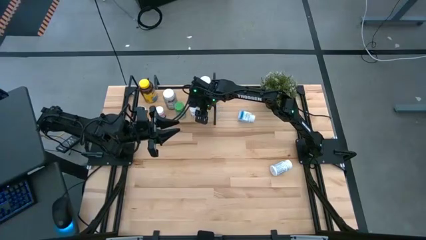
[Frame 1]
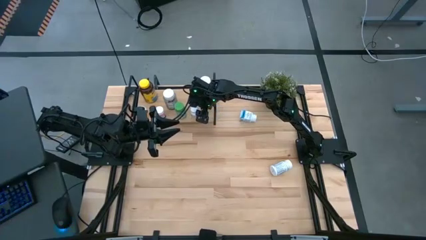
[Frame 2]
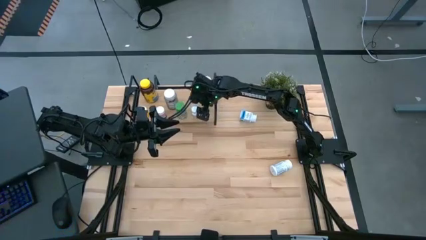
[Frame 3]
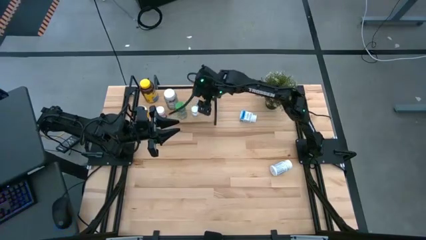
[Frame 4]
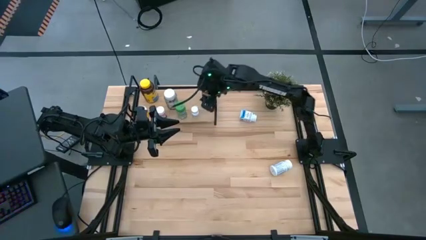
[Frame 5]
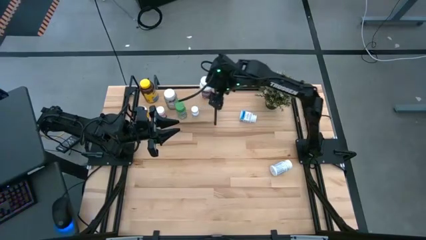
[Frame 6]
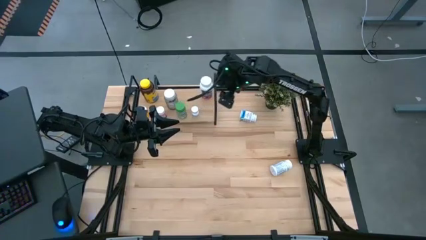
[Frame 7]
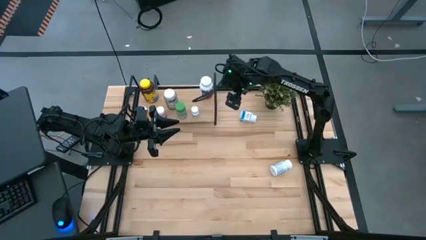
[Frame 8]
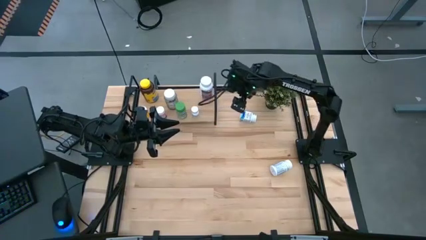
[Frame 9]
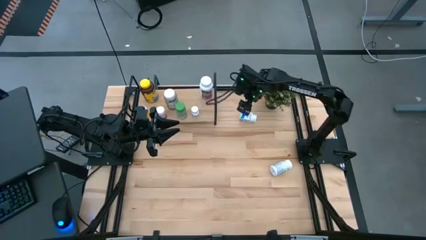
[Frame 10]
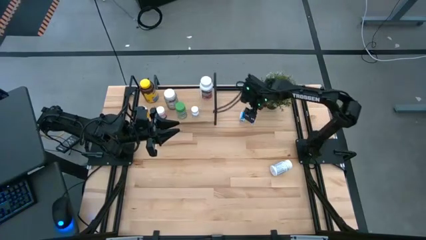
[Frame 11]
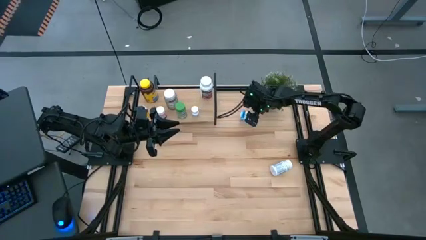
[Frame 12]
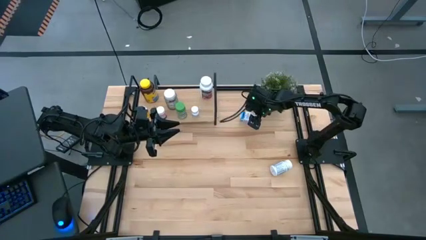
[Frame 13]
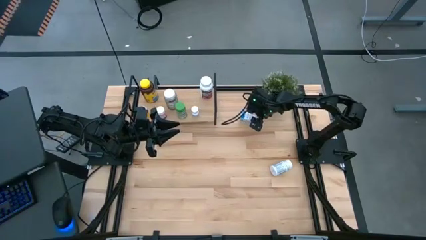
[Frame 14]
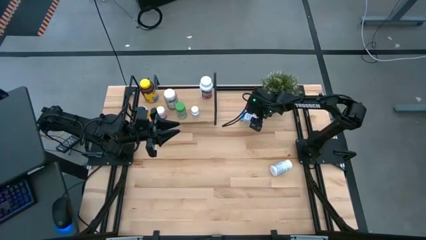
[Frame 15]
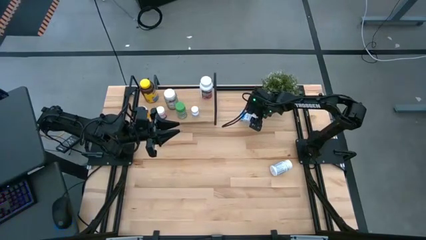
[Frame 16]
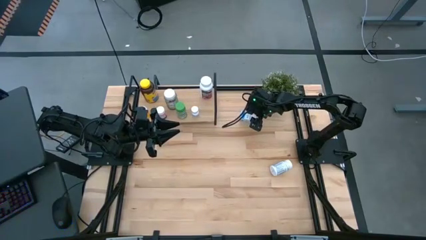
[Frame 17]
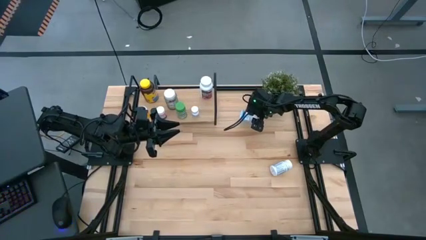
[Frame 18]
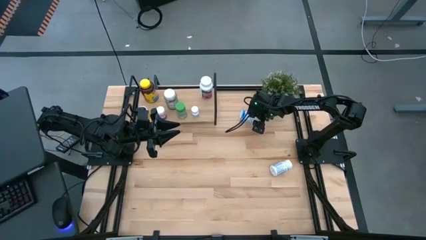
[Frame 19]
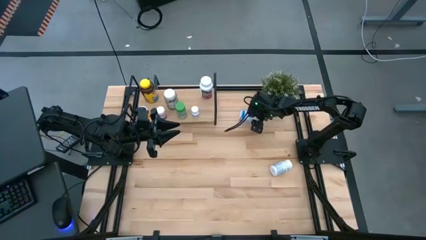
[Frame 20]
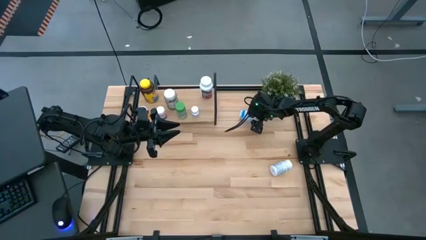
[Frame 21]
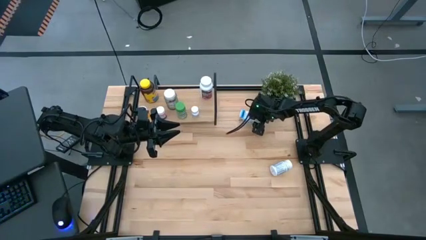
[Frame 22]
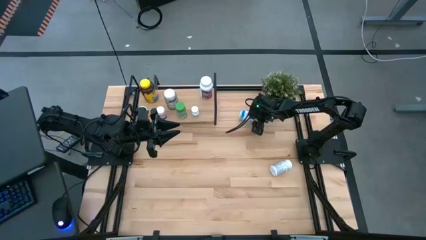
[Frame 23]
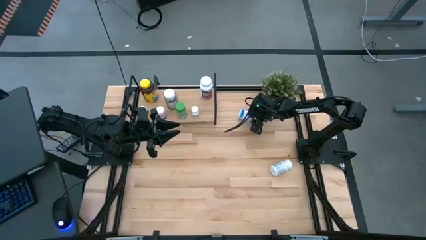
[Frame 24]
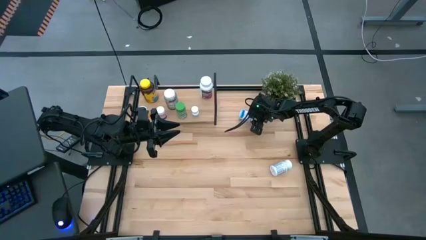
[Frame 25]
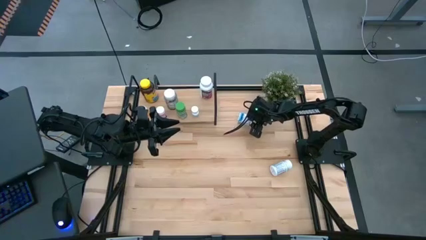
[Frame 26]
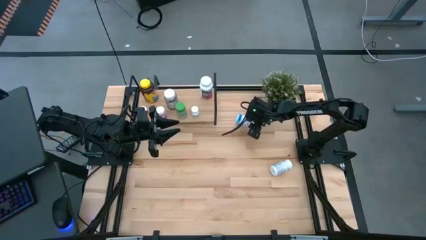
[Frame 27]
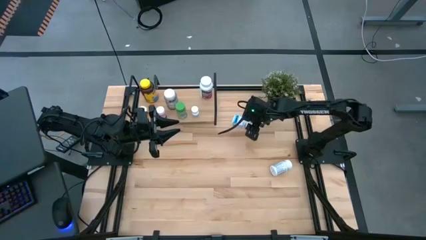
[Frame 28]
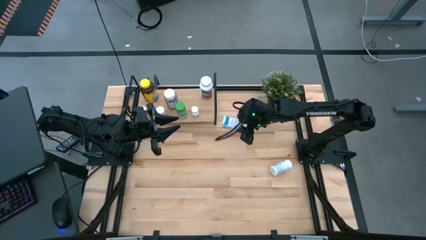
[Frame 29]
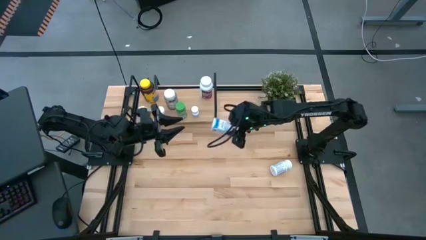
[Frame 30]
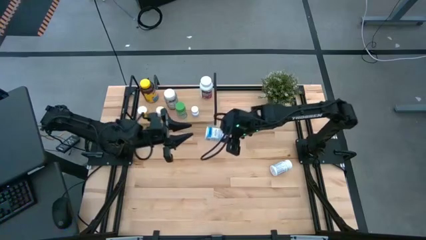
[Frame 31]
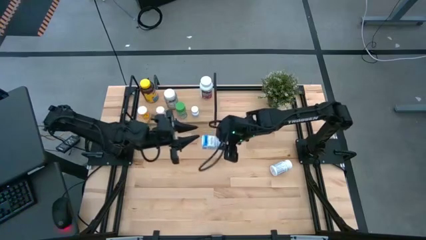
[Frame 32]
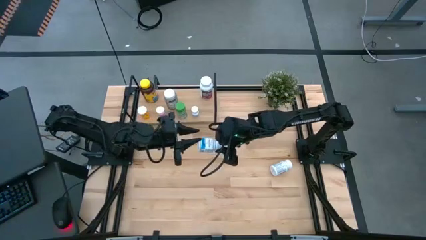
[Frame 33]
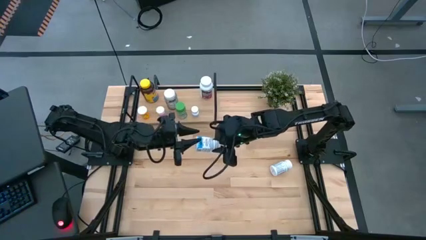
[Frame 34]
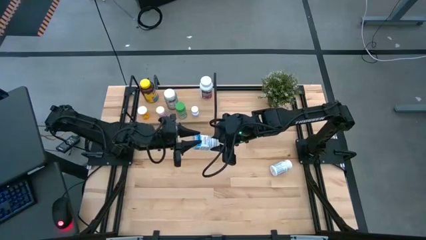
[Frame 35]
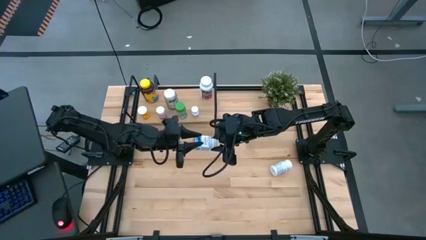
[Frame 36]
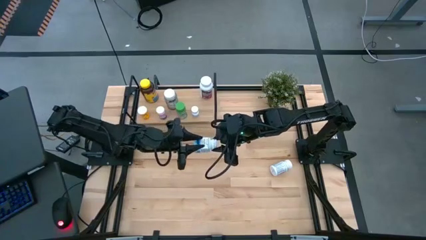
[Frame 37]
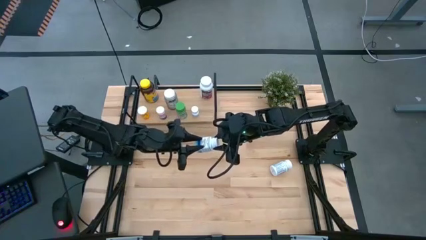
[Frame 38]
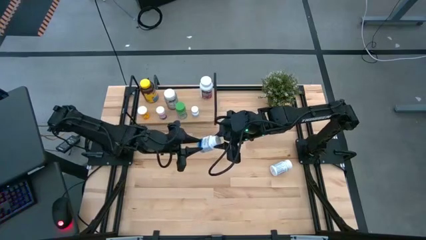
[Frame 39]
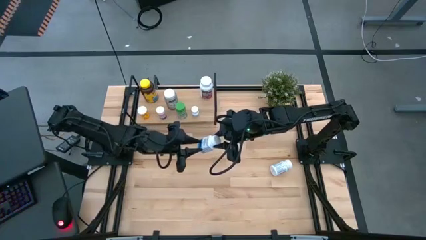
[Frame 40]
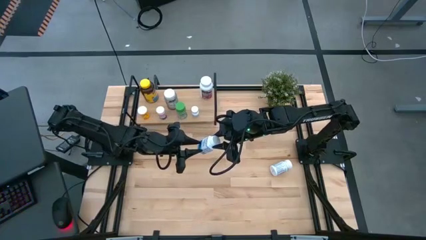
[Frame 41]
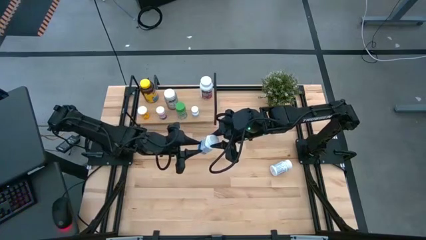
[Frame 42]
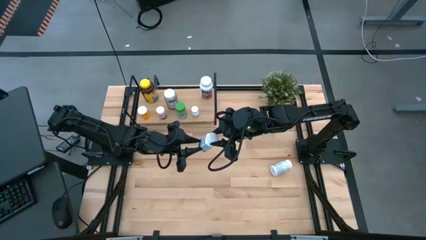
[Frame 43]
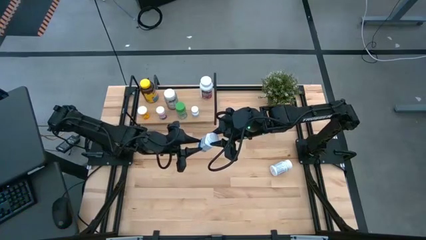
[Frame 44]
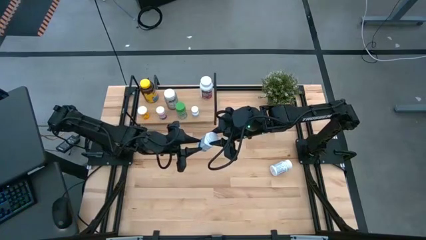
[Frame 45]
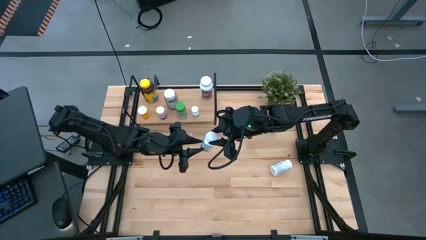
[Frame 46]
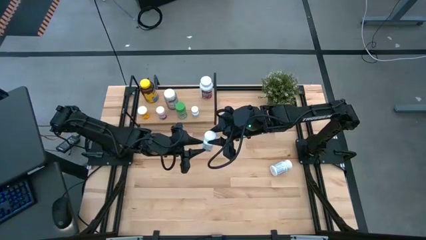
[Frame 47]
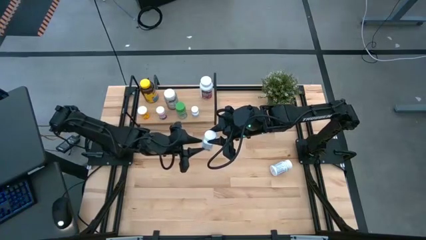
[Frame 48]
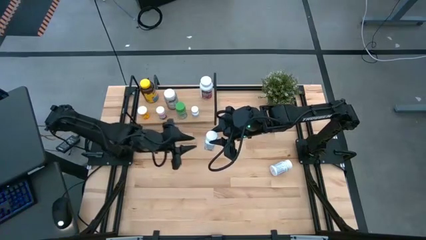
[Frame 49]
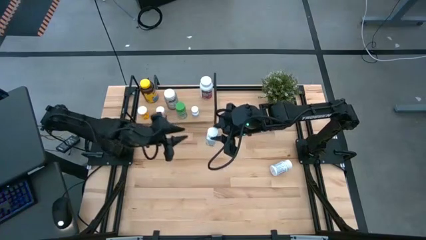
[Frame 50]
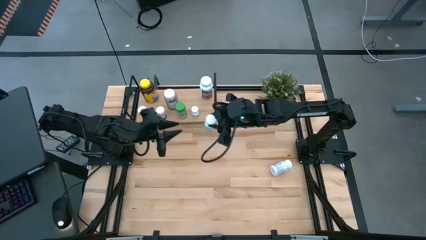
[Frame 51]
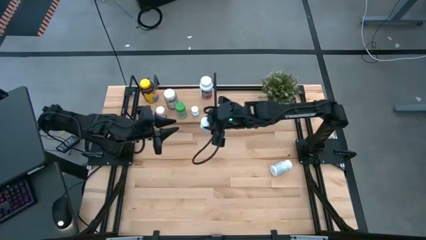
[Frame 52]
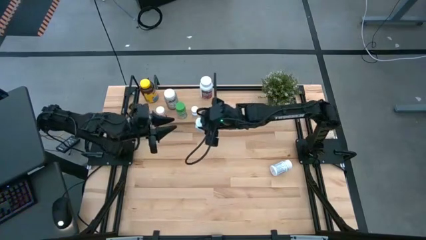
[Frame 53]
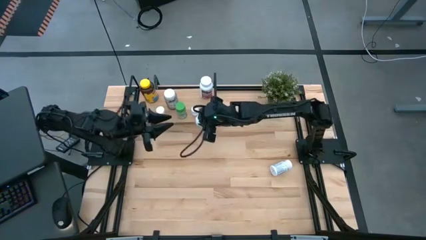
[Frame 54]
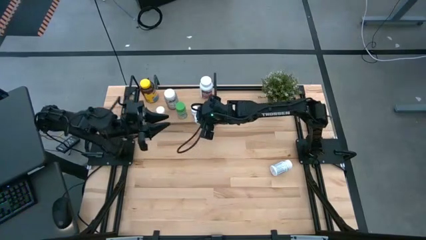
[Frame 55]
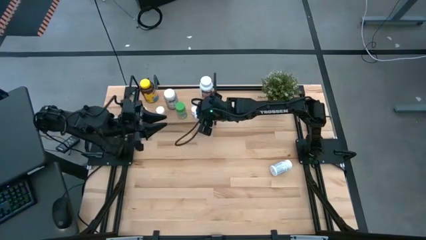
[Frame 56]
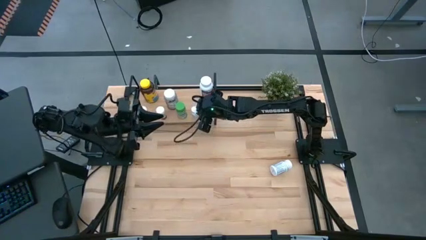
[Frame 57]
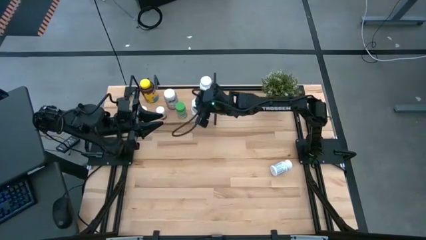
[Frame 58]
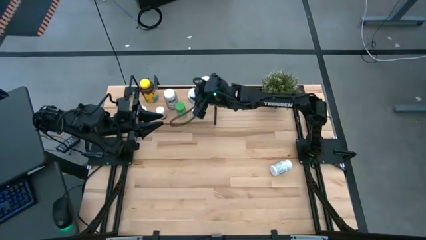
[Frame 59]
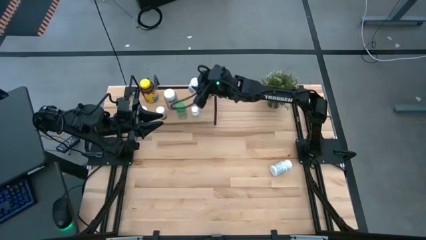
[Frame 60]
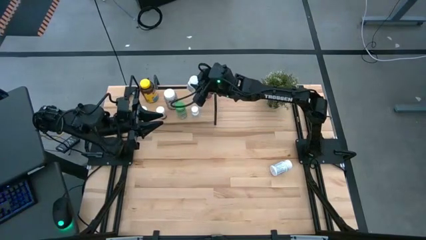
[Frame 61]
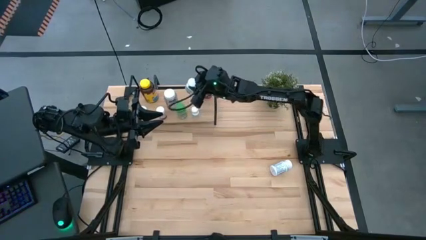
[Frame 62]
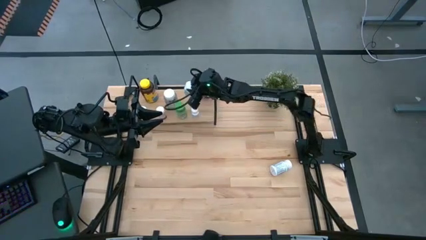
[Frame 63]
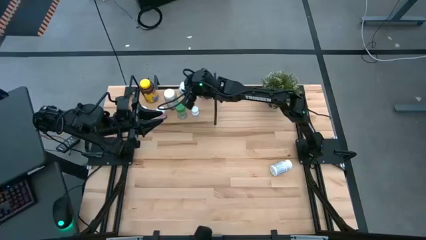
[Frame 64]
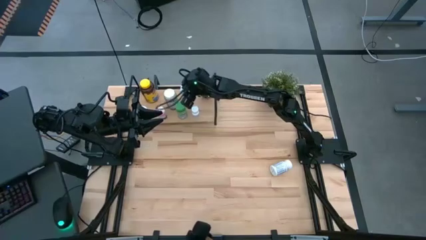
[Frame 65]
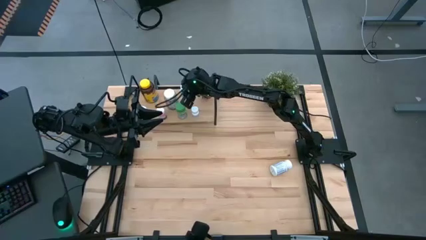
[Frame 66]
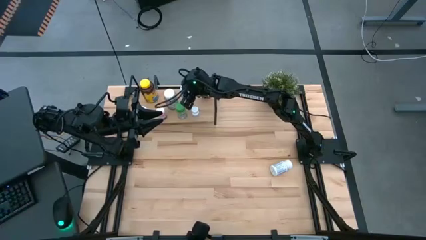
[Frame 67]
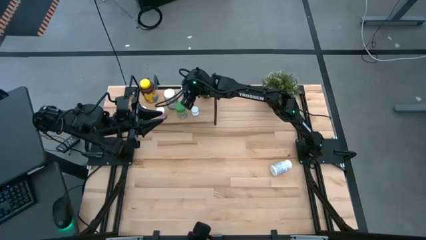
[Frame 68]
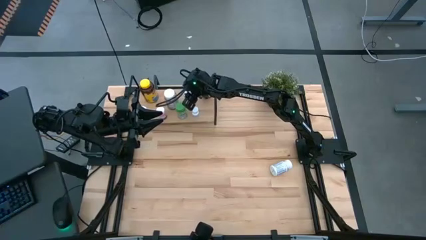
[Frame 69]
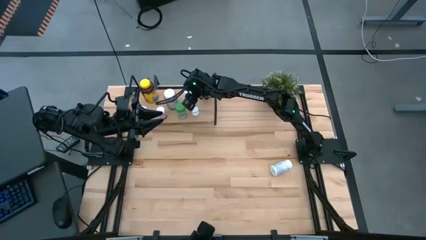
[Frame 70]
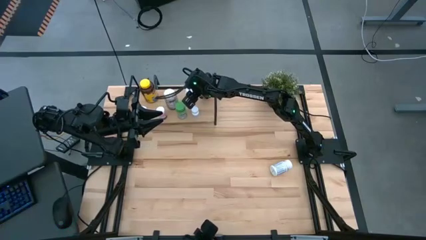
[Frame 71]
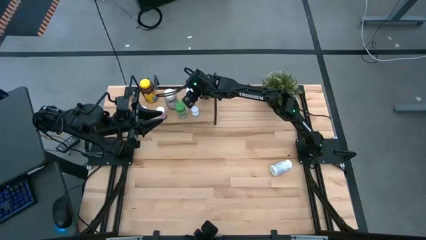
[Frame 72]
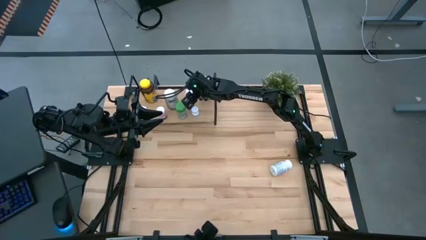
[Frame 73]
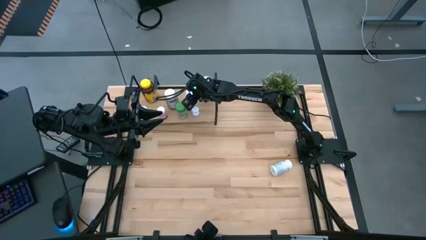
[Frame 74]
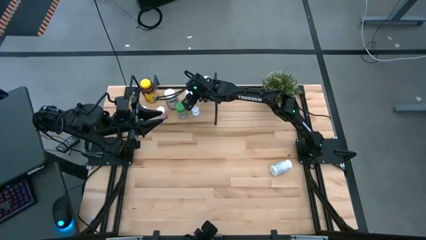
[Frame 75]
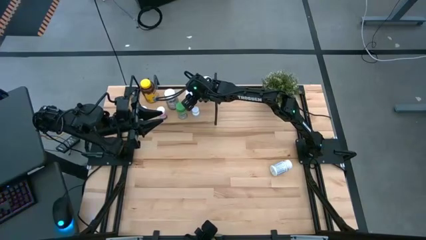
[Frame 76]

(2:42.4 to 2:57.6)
Task: Pick and place medicine bottles onto shelf by color
Put the blue medicine bottle on the shelf
